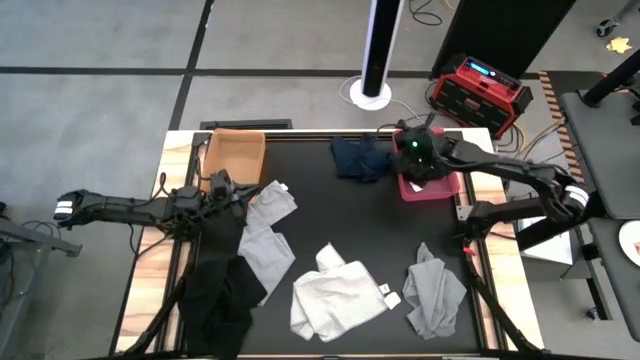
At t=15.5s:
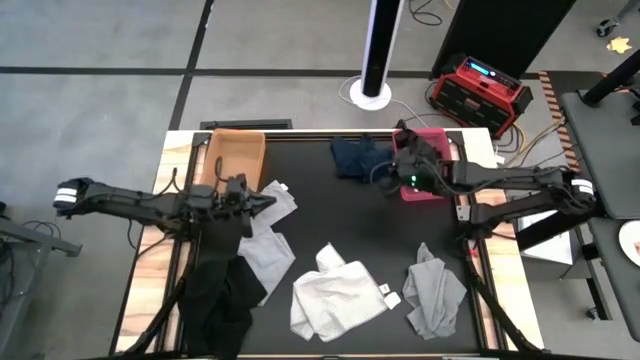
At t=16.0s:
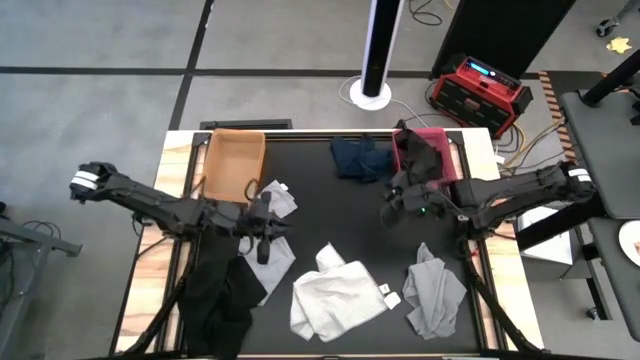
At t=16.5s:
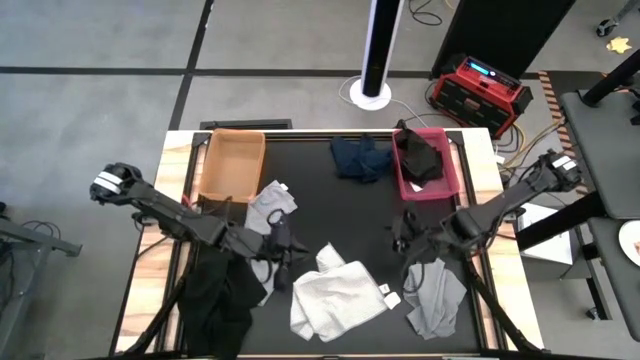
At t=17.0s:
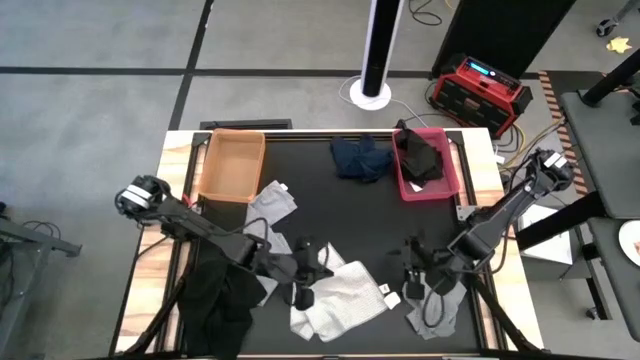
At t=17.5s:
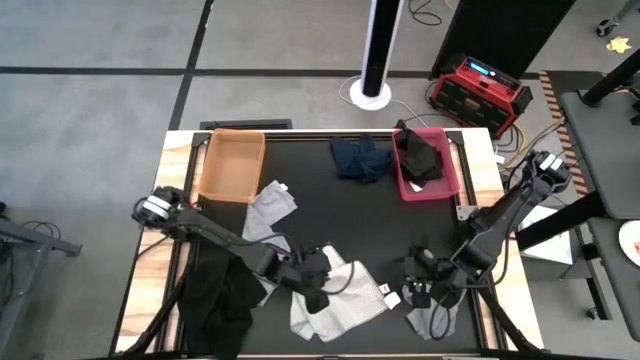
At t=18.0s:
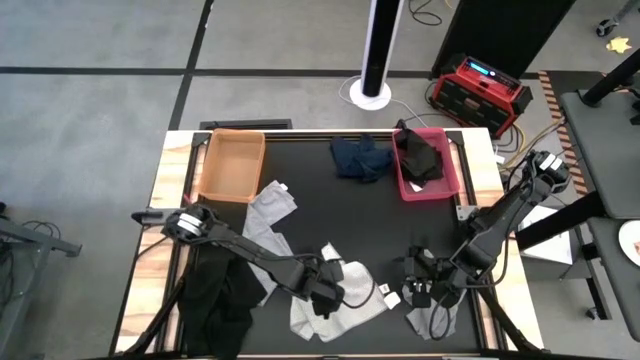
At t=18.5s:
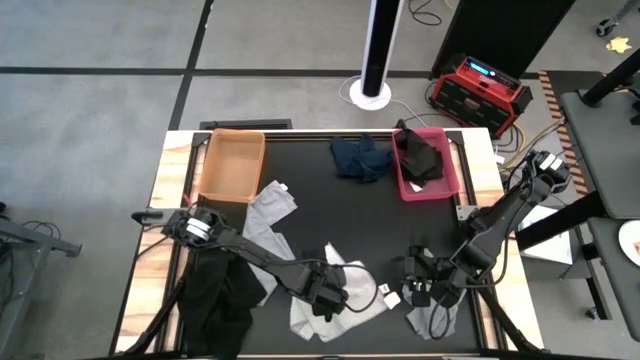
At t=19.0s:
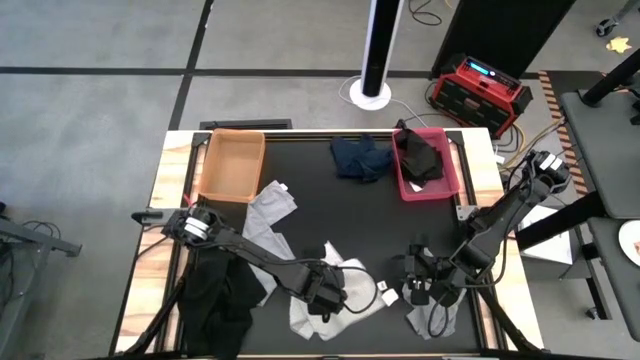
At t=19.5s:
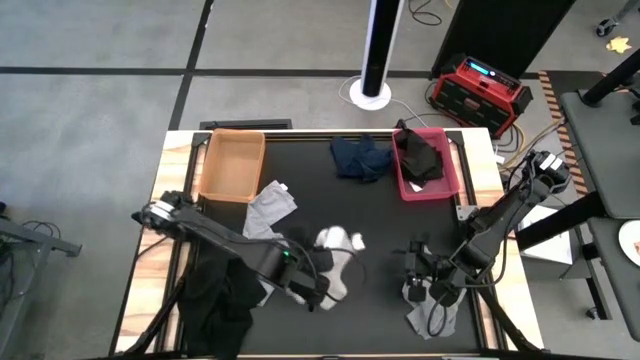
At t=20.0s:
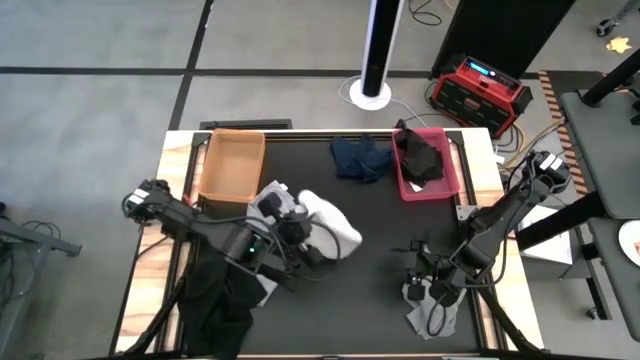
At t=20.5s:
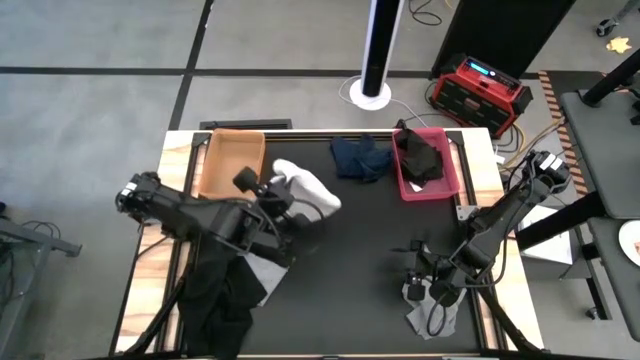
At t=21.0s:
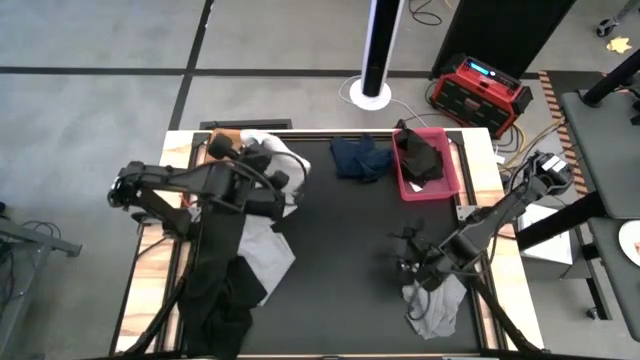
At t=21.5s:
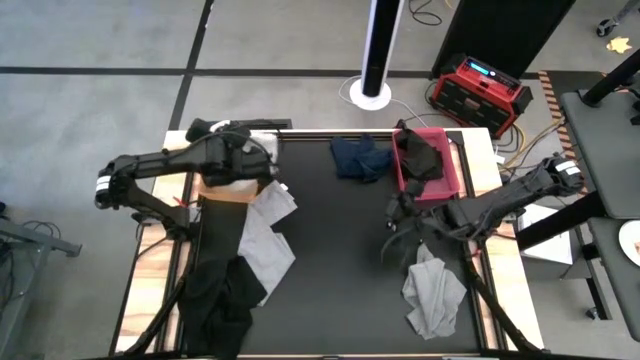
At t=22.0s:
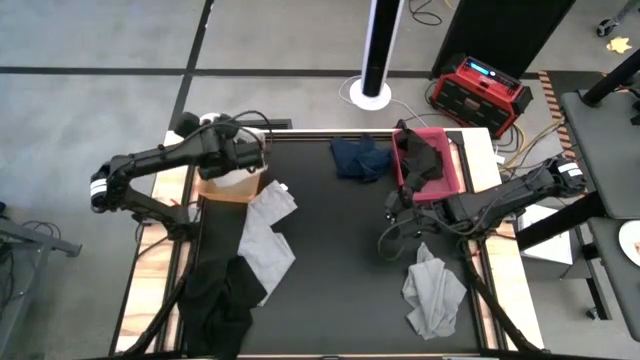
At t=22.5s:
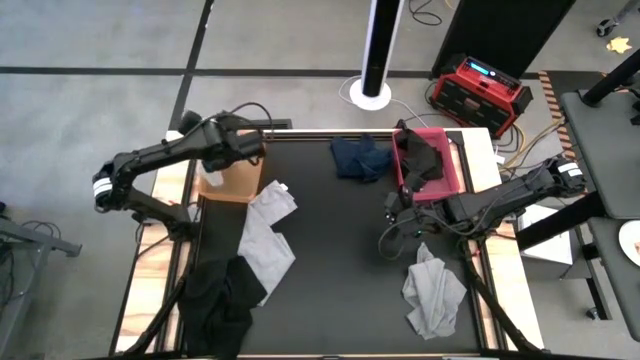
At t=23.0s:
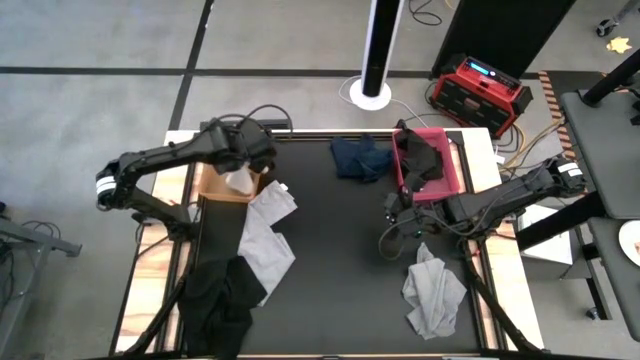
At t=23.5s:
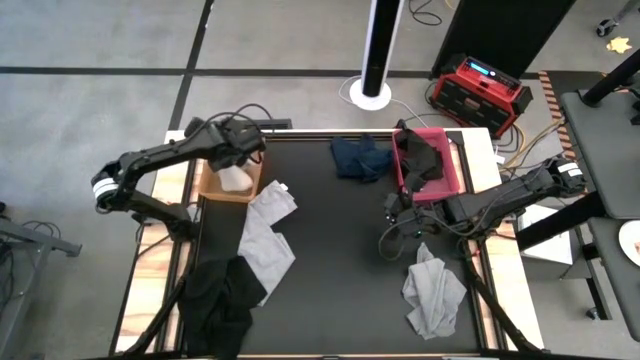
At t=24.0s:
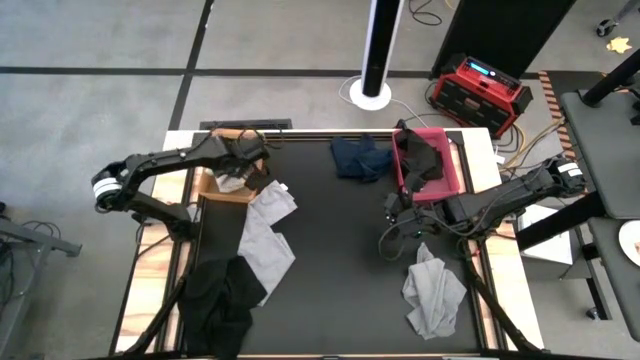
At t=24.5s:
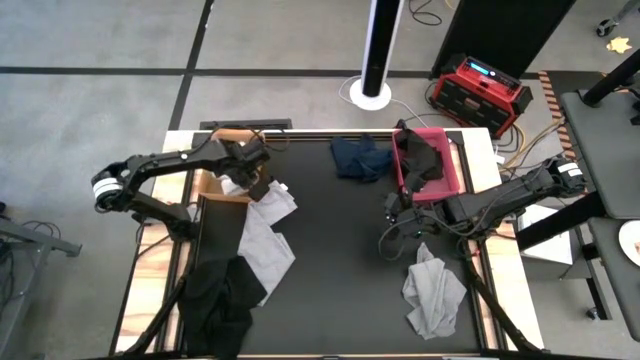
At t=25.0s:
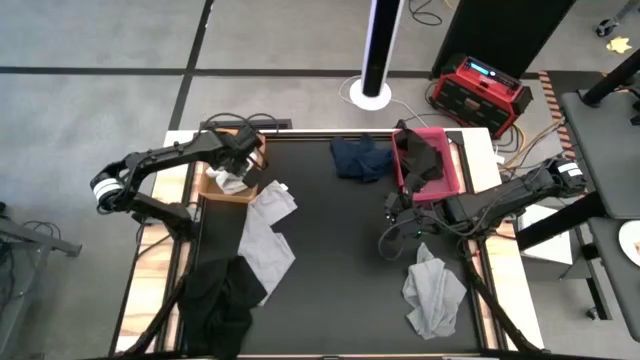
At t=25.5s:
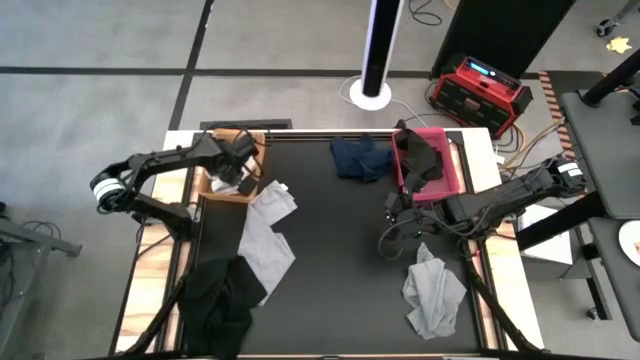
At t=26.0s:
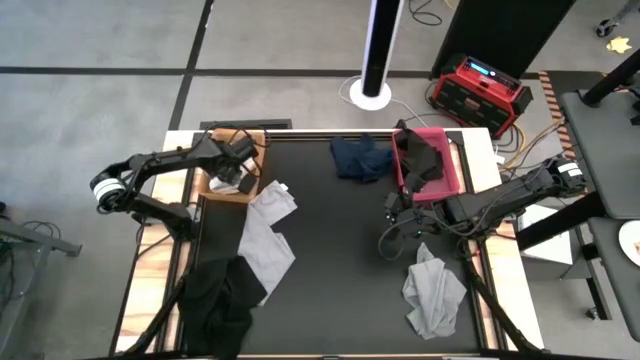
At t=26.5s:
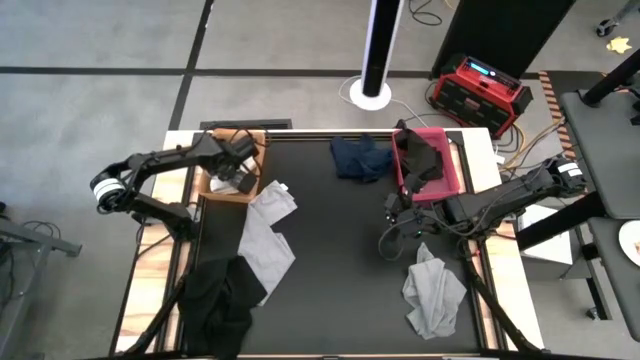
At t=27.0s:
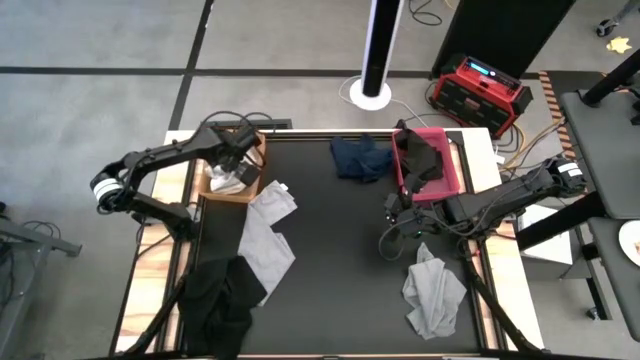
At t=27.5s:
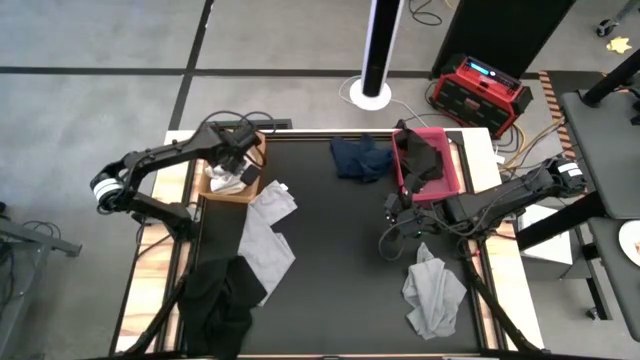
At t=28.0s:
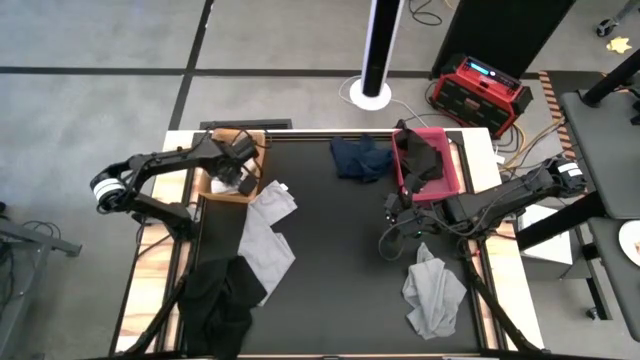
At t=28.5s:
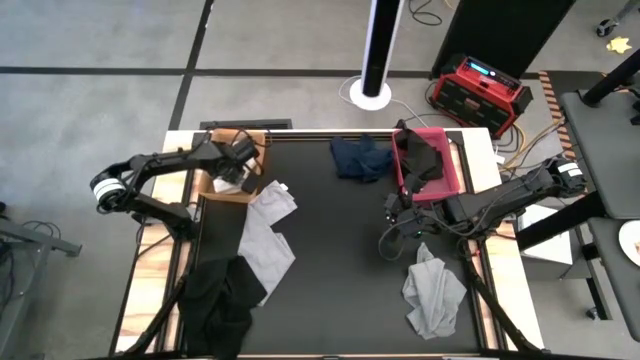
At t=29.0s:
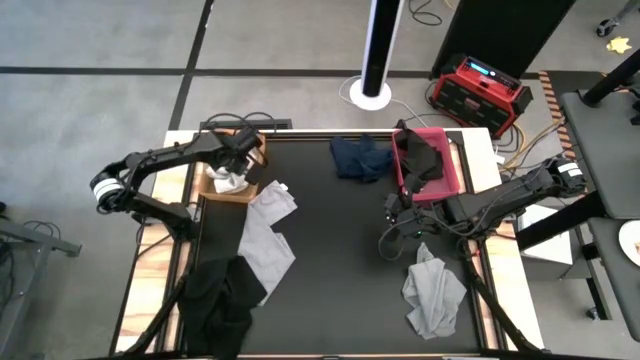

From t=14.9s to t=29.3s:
Task: Sort towels by color in basket
Put the white towel into the orange bin

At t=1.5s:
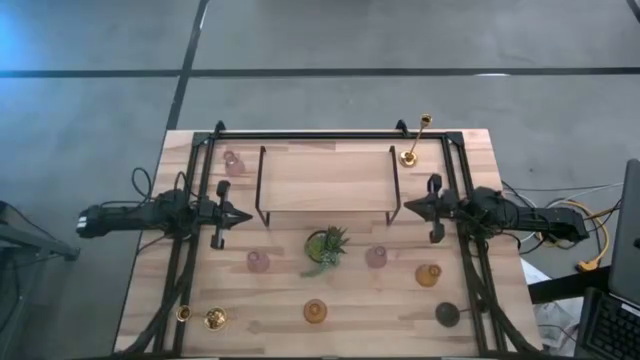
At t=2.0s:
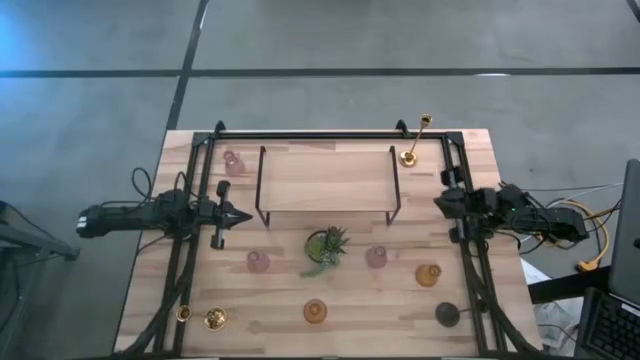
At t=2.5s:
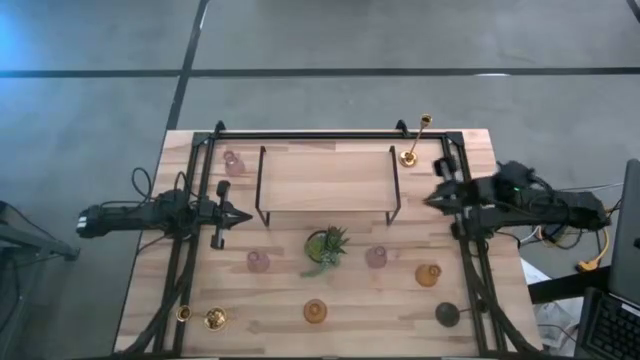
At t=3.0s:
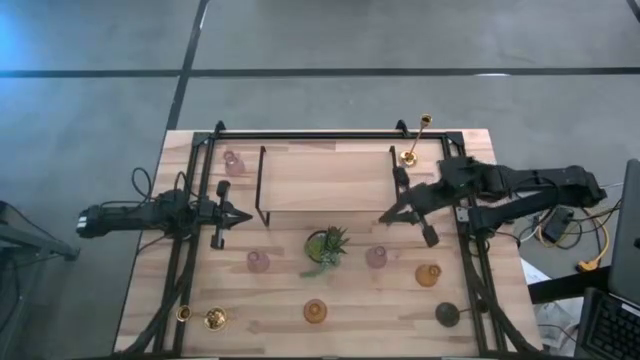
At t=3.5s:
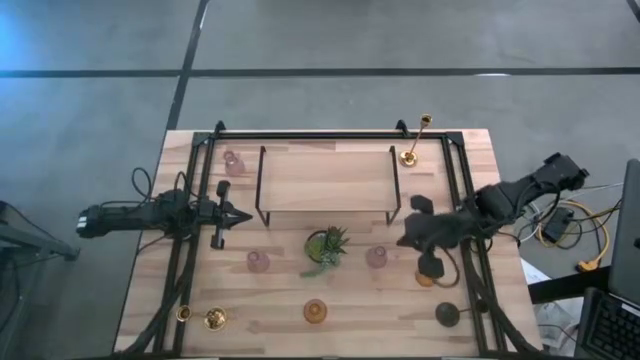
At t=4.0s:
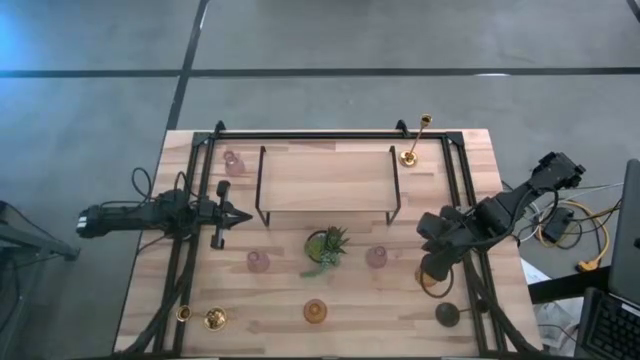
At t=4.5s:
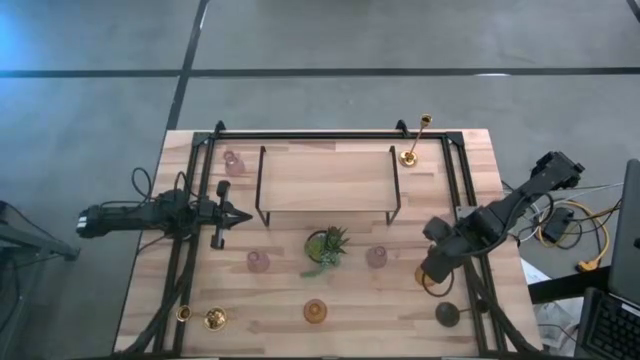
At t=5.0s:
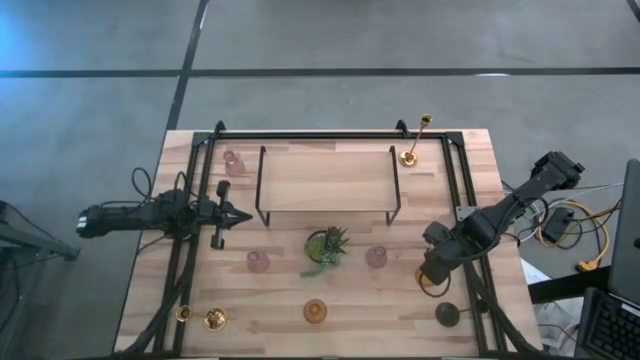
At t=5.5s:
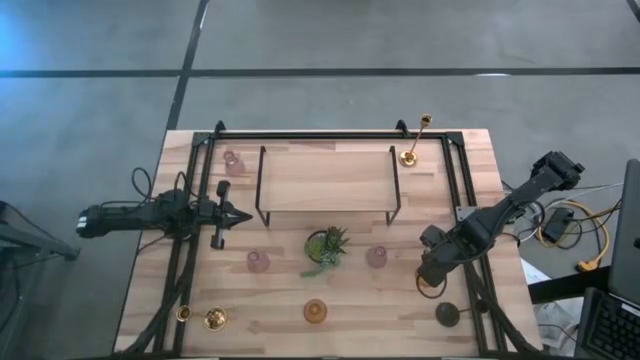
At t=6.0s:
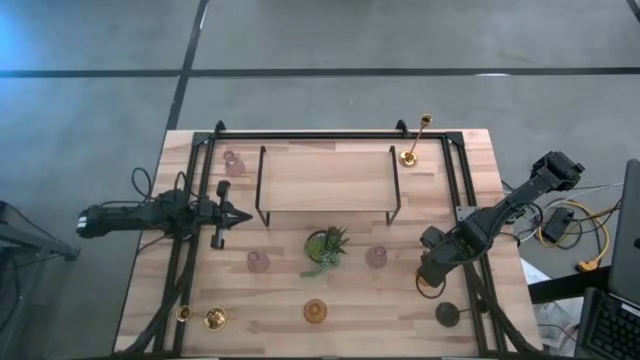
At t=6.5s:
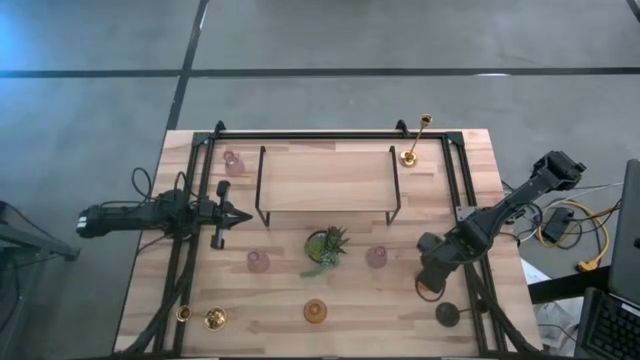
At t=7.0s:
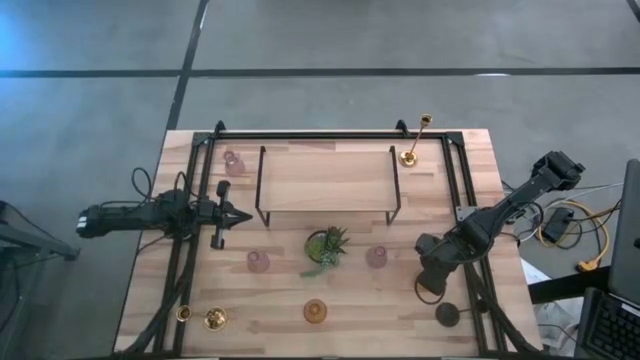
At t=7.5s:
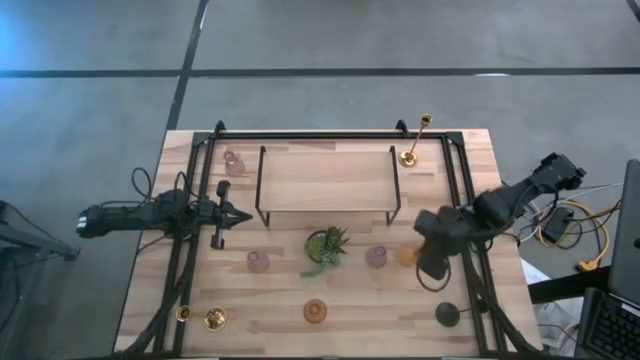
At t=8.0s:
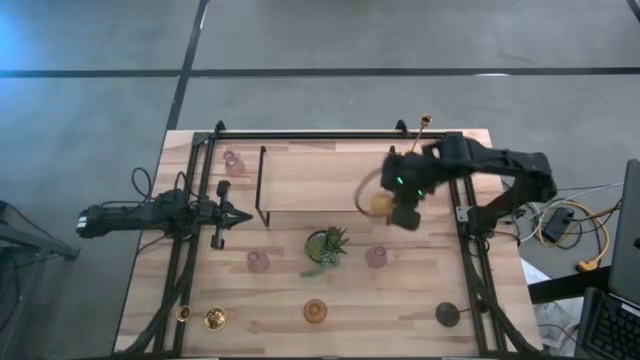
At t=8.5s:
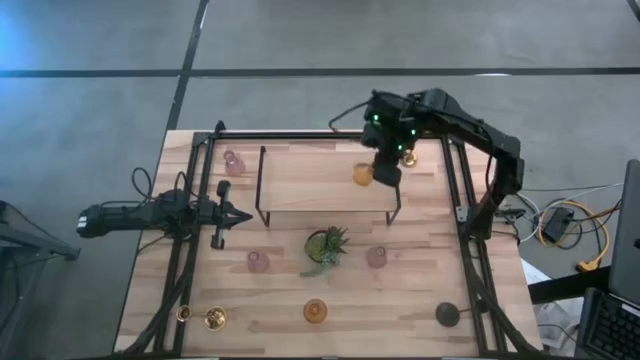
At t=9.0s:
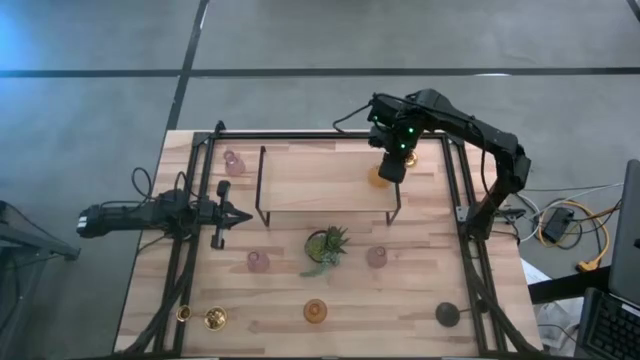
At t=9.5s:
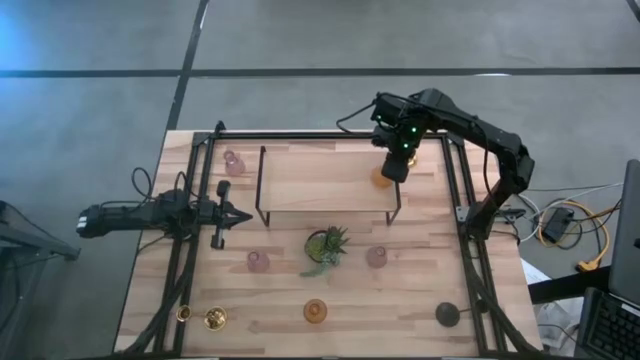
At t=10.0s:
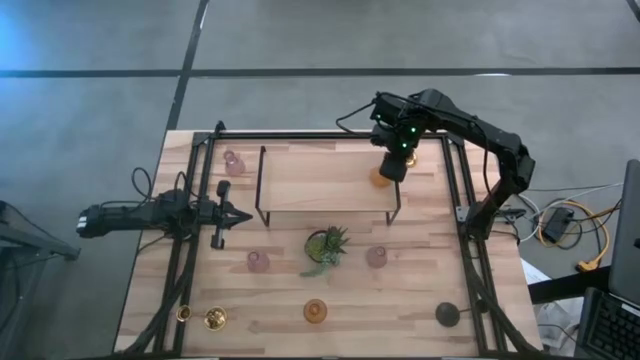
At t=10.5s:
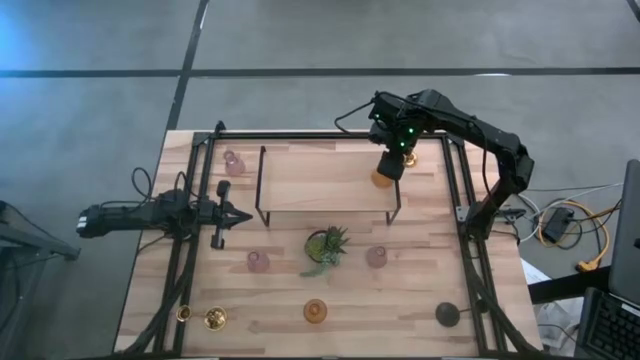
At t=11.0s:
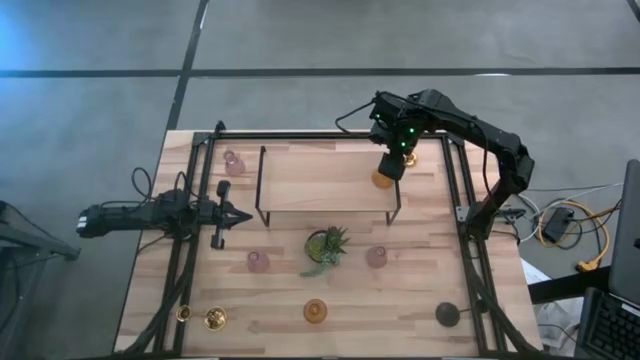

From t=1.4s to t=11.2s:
Task: Pick & Place candle stick holders
Put the yellow glass candle holder on the shelf
